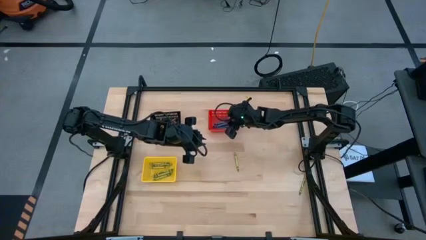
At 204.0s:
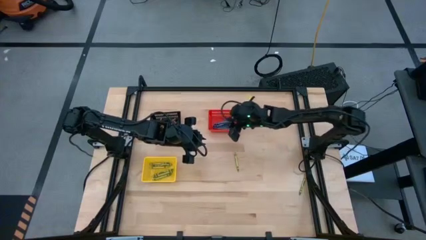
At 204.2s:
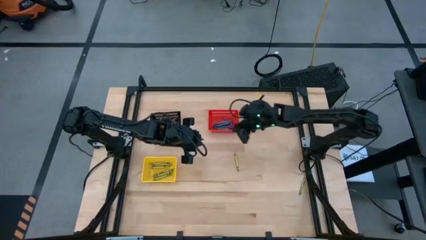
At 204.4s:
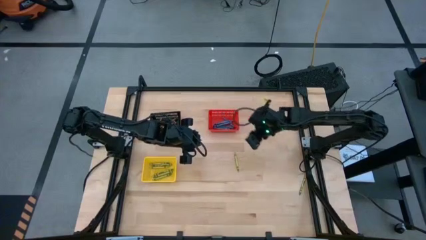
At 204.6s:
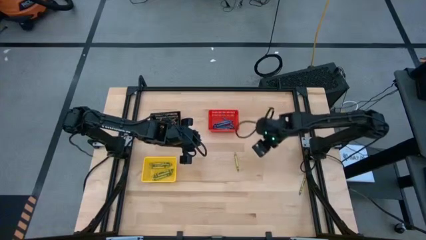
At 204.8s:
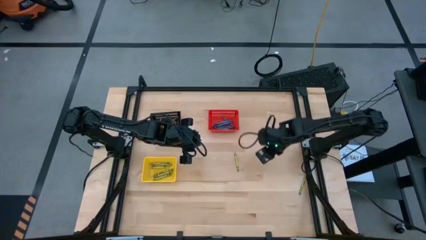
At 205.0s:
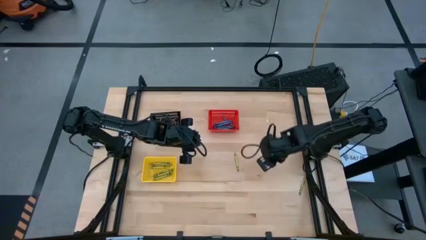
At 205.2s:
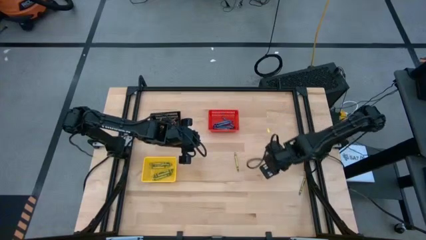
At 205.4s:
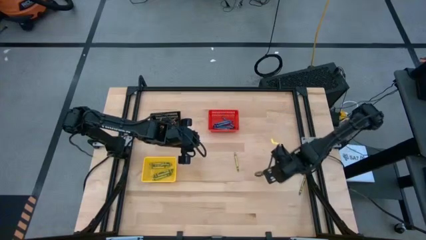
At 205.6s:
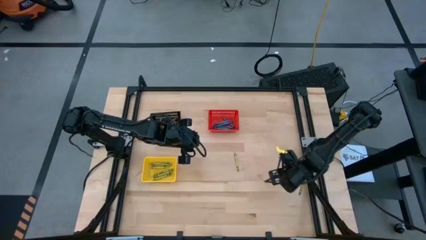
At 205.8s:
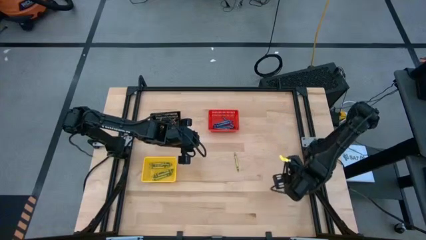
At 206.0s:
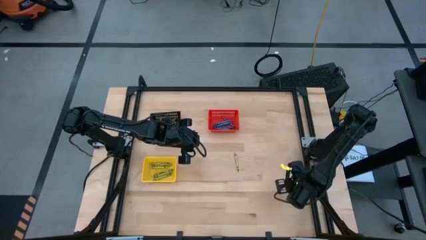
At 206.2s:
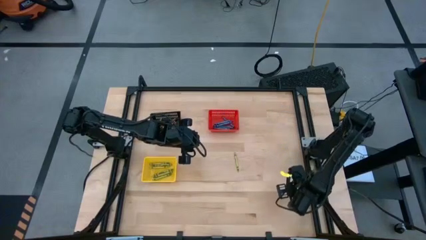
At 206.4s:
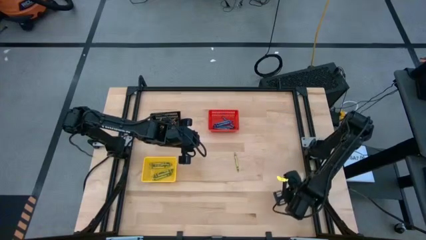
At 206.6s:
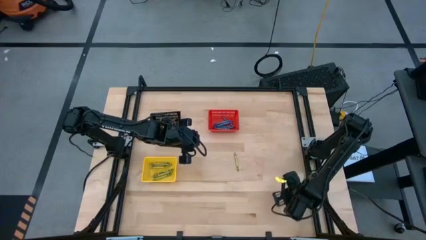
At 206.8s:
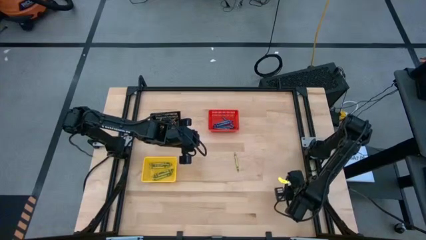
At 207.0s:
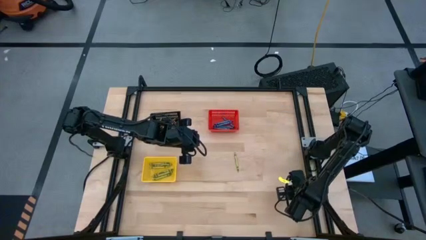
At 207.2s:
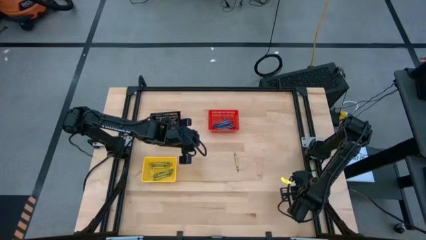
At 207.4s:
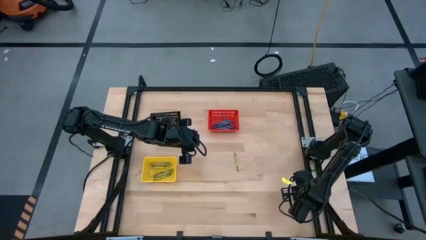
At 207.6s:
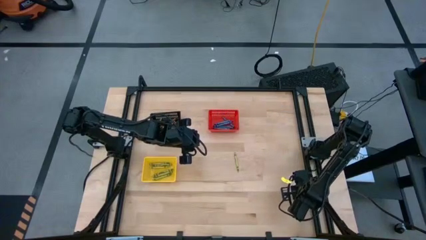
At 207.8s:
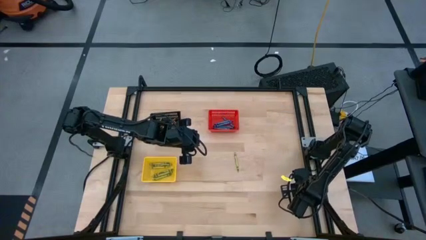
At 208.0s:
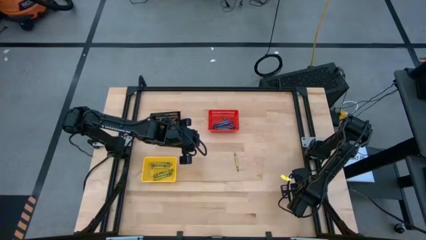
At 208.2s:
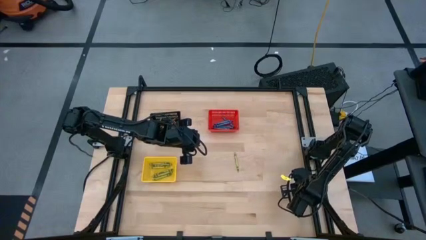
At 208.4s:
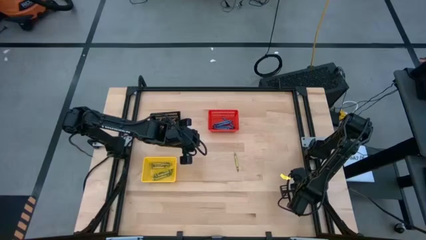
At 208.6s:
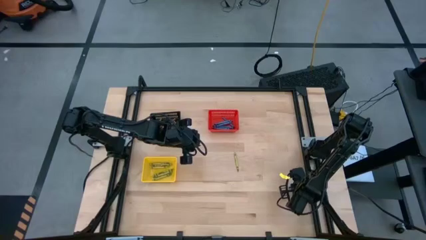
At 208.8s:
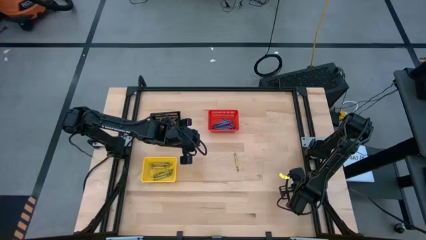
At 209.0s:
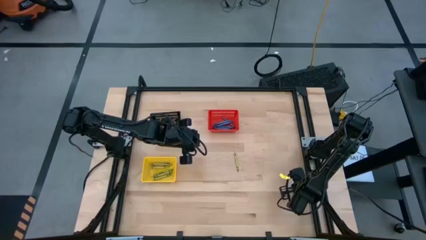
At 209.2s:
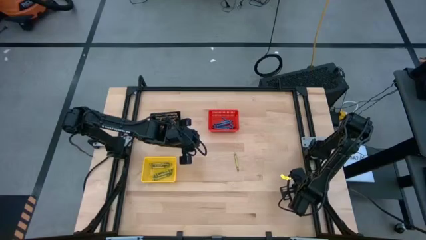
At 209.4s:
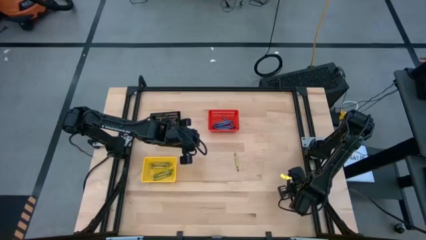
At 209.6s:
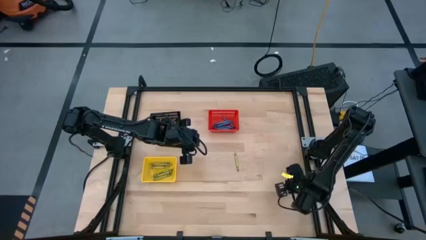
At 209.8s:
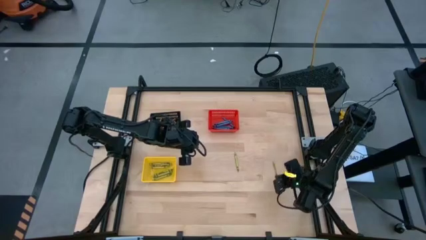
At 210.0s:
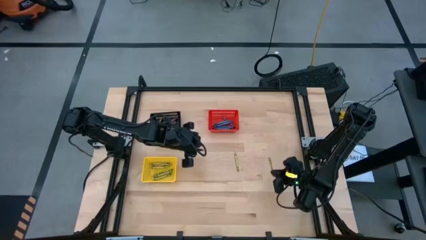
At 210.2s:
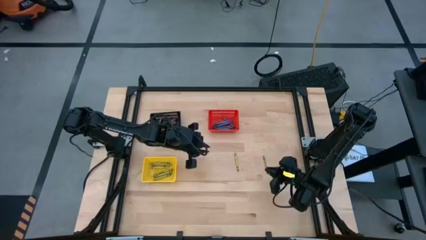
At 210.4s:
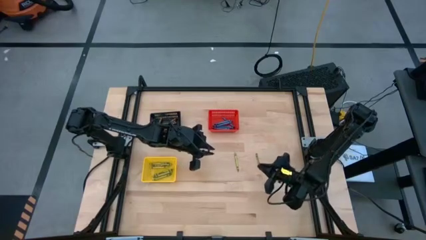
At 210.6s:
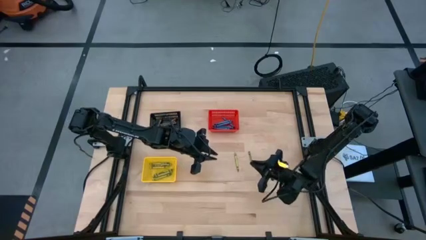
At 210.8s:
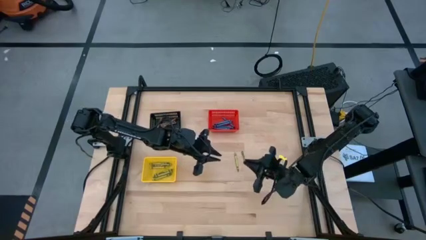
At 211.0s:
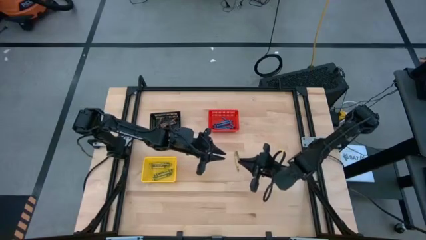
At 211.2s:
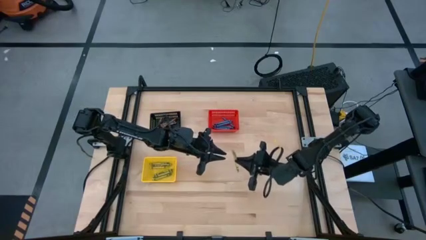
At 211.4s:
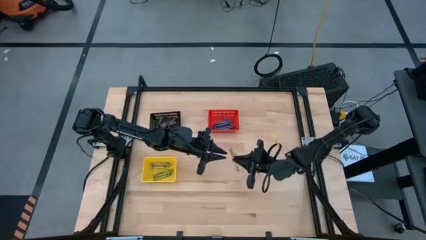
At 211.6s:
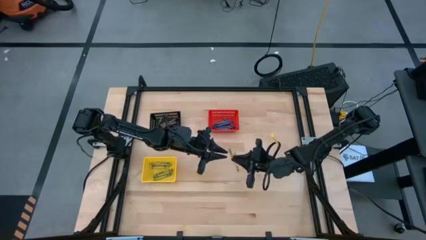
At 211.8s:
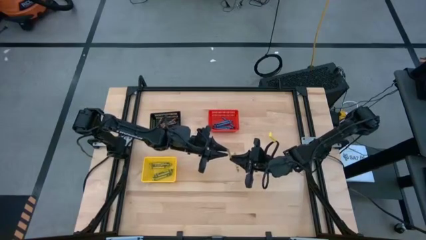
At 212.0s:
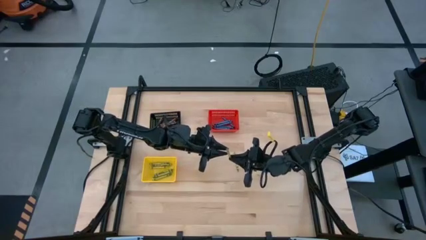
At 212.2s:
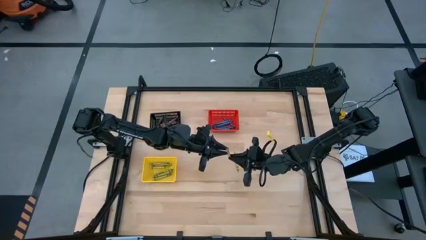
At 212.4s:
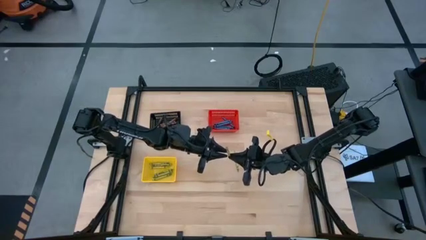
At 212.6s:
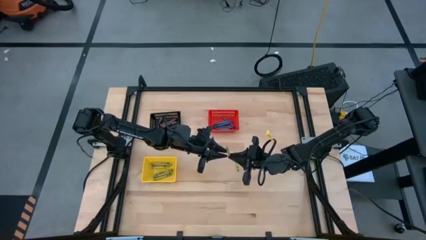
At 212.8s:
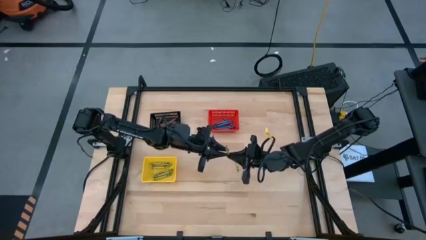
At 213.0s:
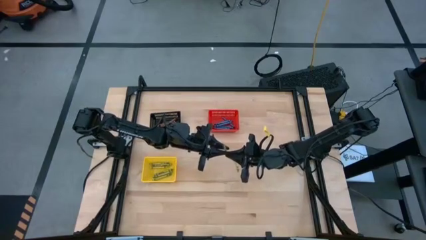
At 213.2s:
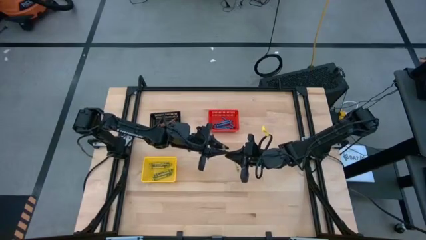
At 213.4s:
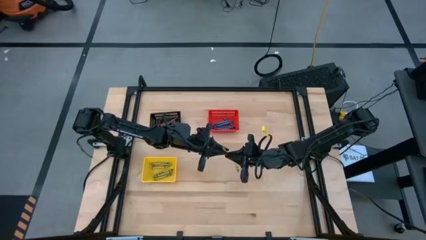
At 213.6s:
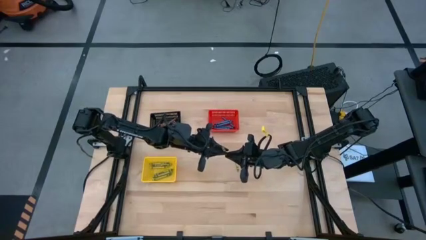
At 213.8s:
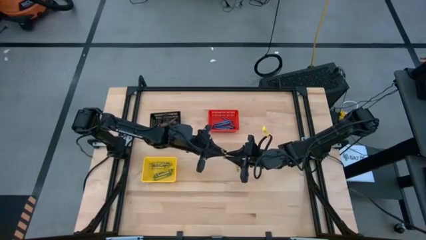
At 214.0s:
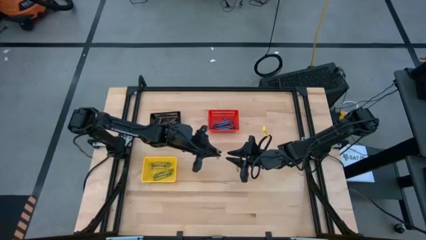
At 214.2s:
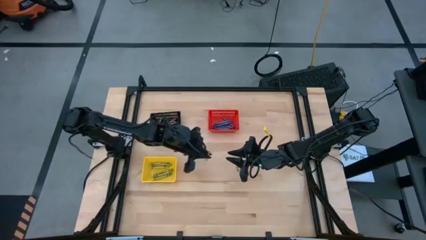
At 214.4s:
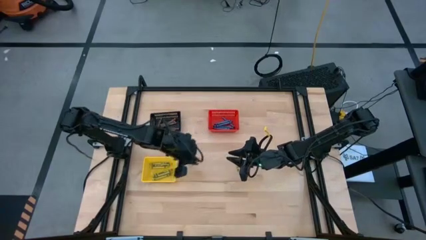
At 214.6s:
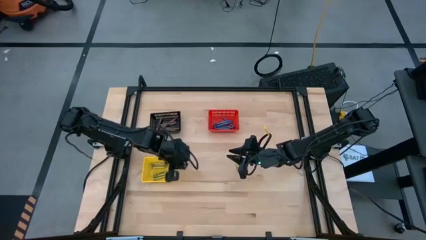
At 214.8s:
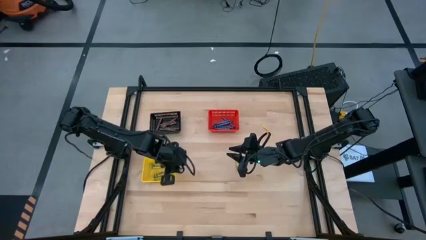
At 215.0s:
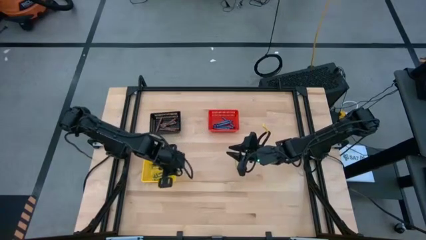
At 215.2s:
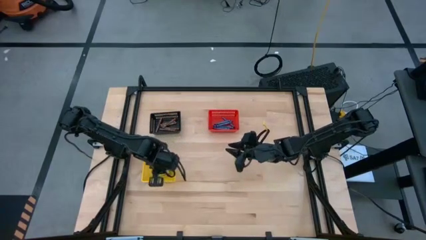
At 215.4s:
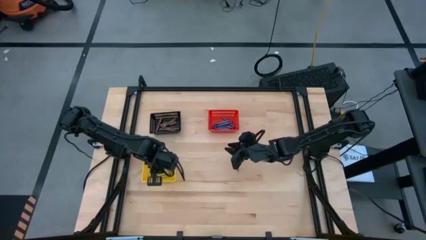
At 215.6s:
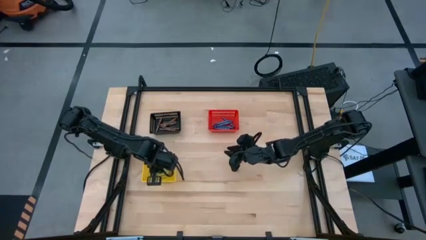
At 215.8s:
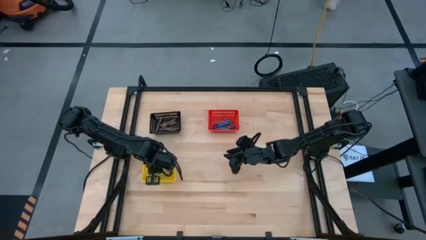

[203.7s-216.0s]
Task: Sort crayons
Put the green crayon into the yellow bin

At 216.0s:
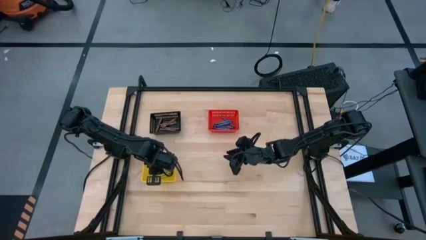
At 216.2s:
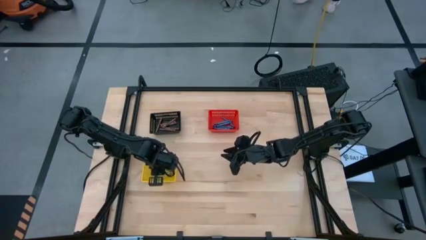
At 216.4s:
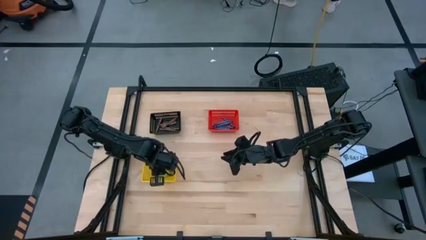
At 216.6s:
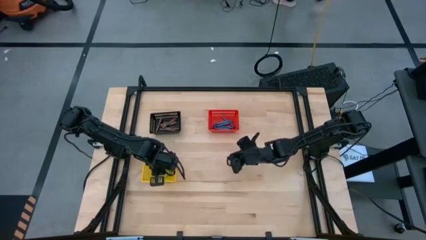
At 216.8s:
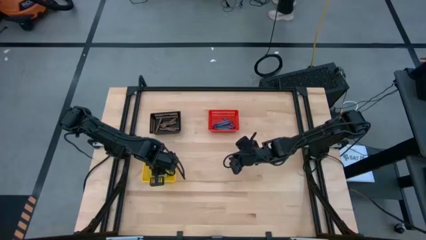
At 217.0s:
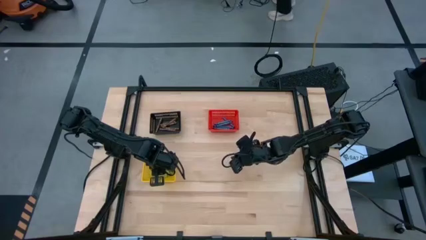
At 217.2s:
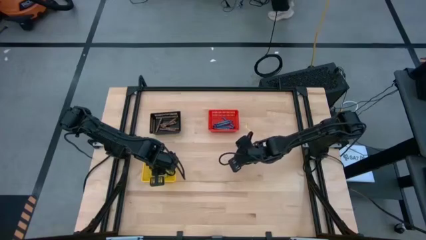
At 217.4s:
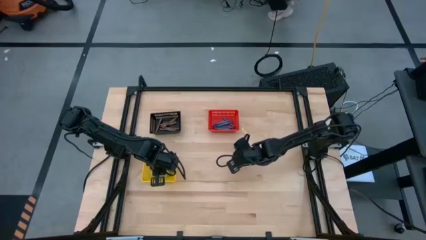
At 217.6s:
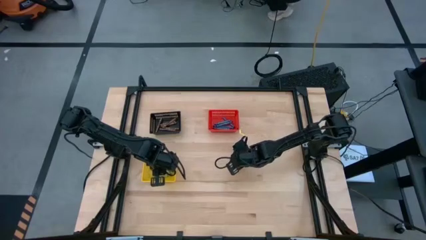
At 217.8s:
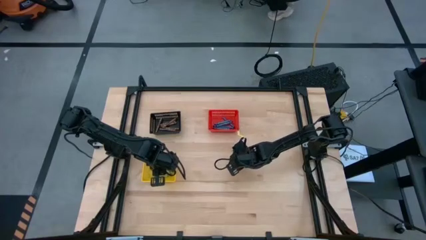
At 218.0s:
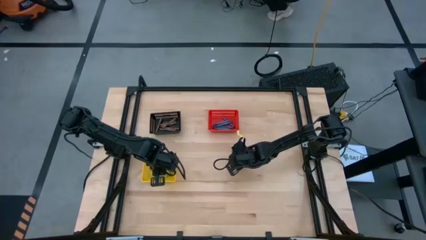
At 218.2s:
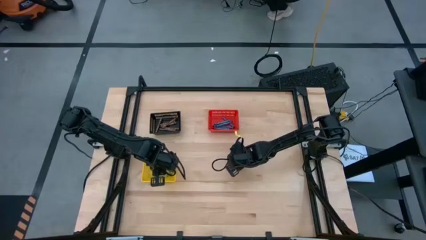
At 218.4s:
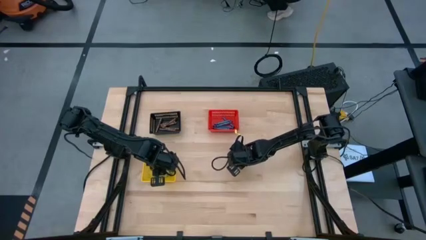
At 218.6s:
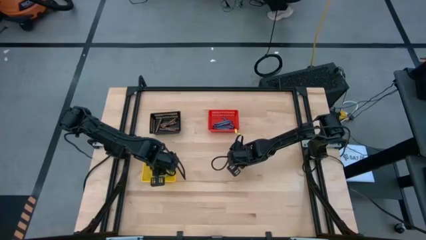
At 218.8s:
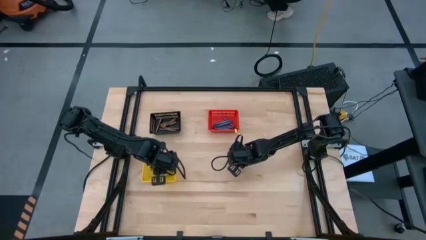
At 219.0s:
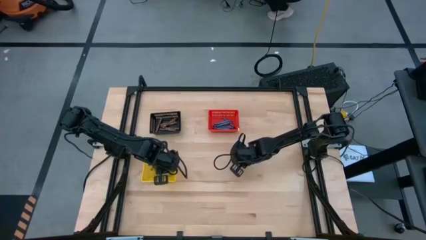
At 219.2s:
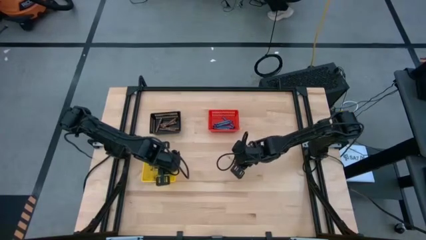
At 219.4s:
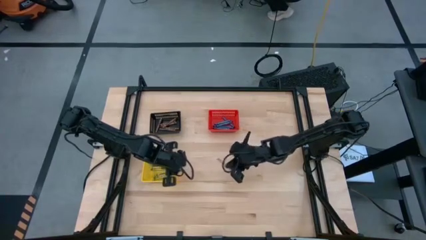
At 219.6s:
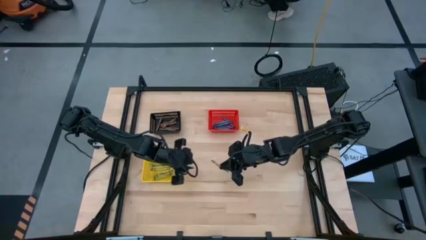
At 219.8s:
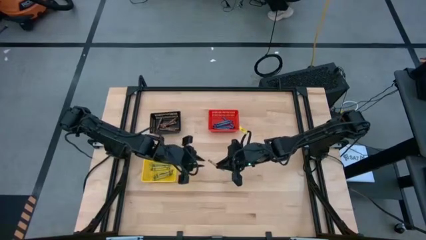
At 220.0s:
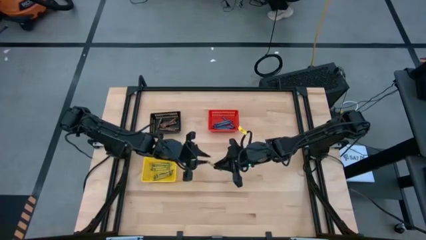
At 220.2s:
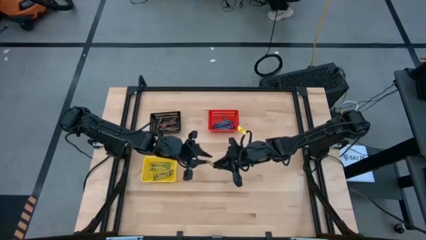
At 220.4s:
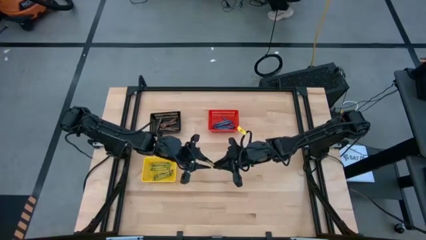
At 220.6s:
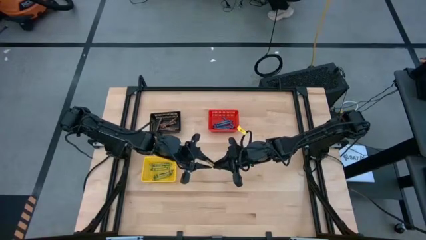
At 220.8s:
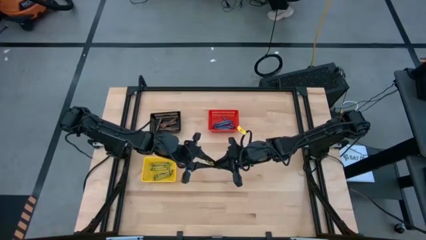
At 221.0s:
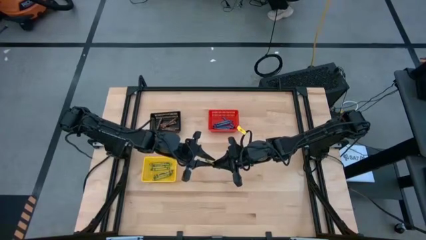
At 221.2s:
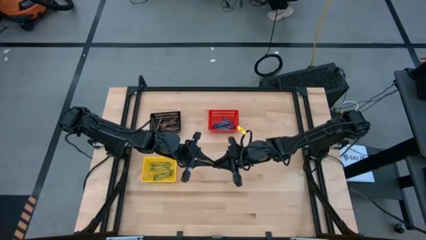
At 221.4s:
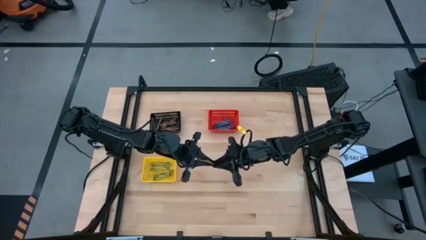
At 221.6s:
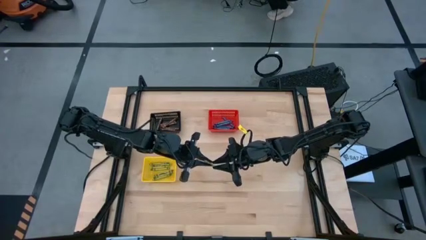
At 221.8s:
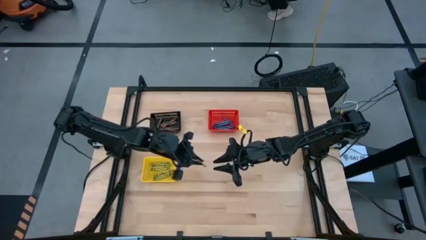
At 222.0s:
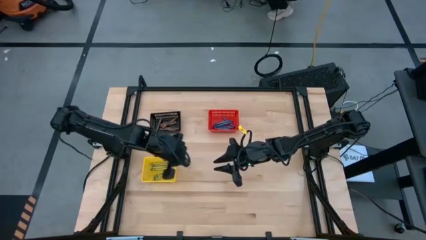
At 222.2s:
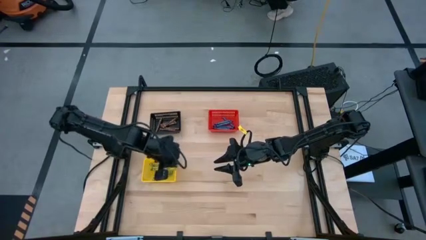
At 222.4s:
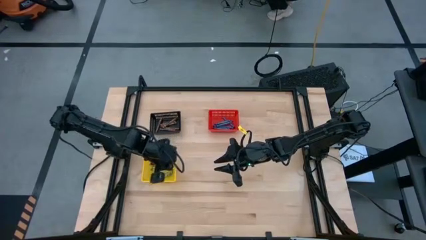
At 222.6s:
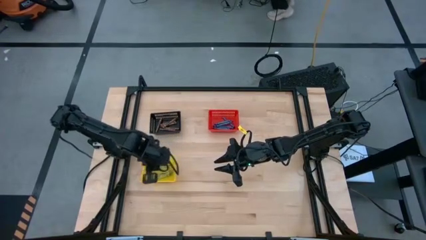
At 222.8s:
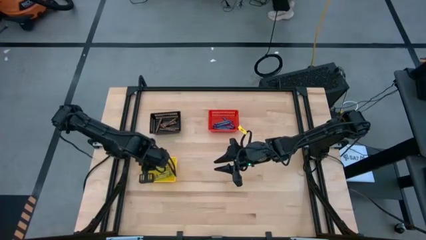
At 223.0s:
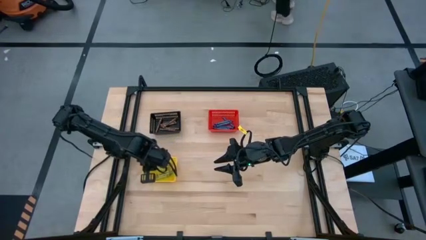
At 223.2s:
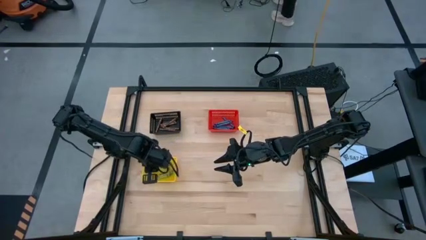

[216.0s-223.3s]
Put the green crayon into the yellow bin
